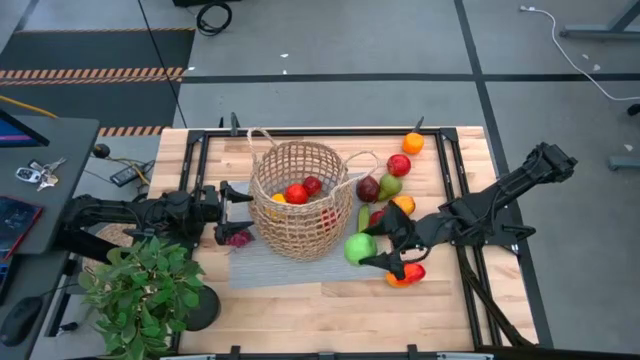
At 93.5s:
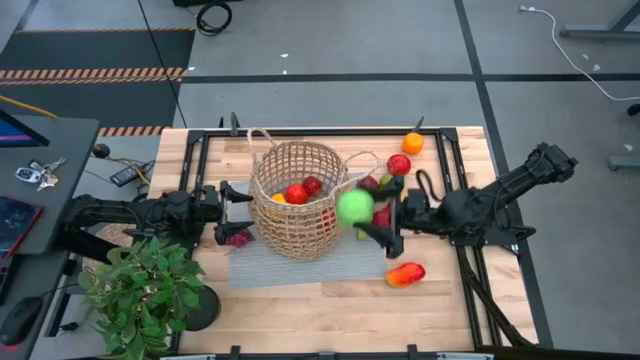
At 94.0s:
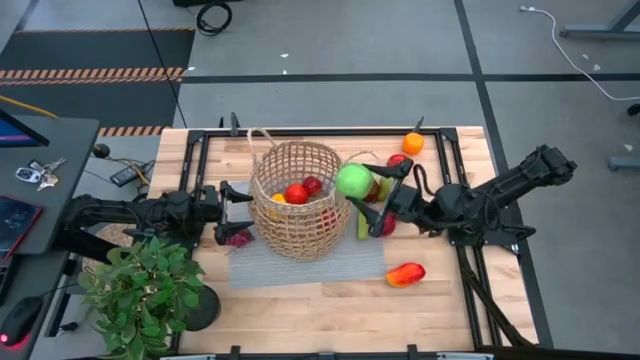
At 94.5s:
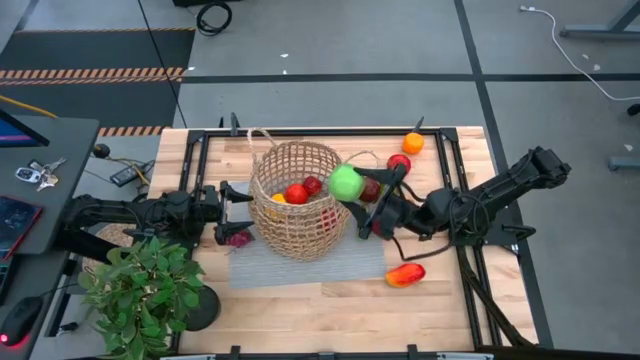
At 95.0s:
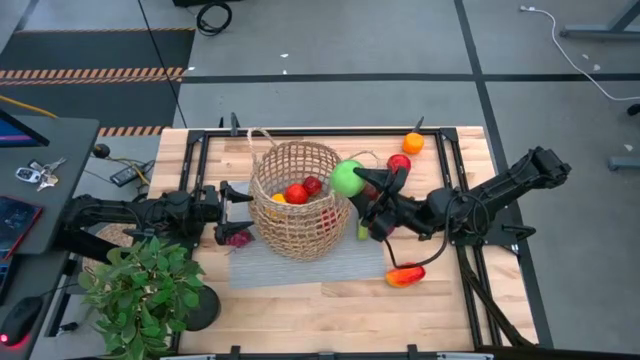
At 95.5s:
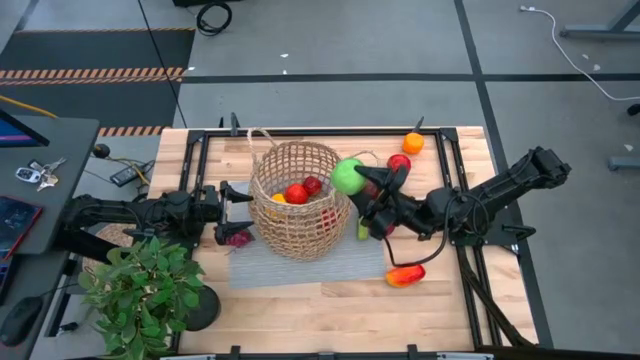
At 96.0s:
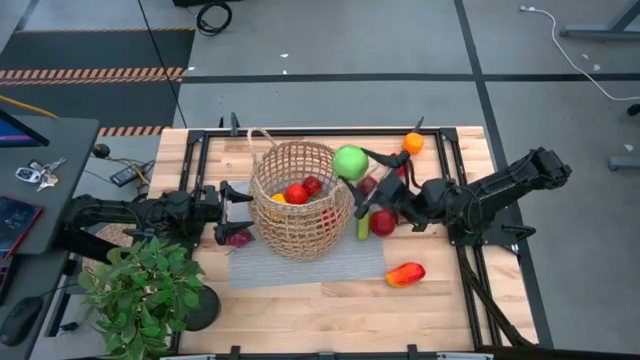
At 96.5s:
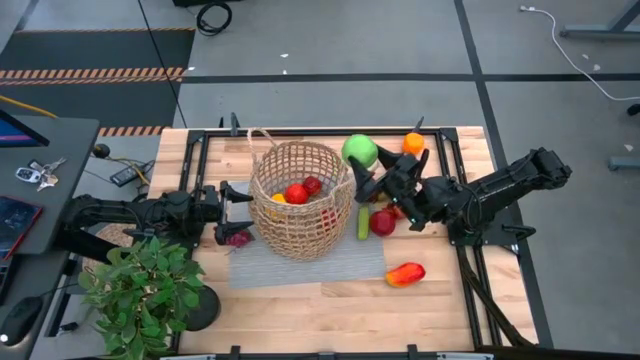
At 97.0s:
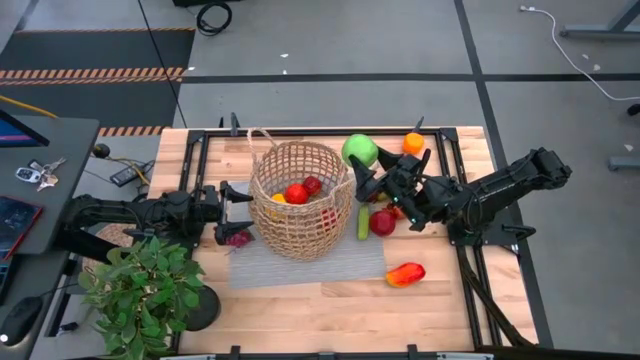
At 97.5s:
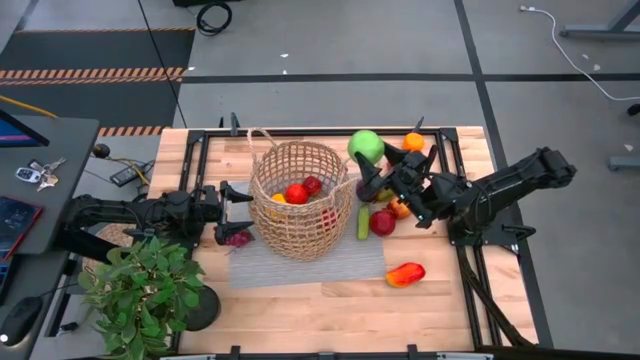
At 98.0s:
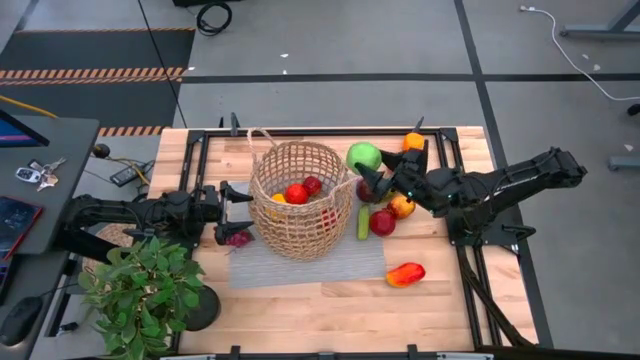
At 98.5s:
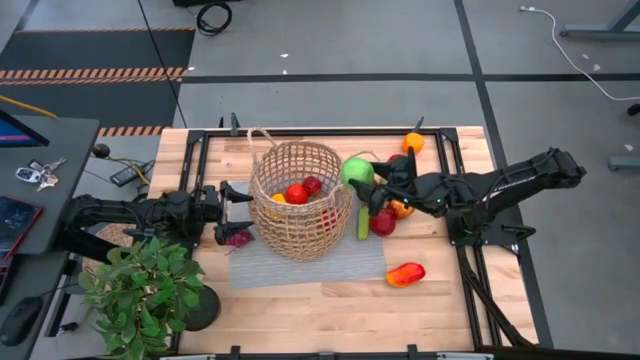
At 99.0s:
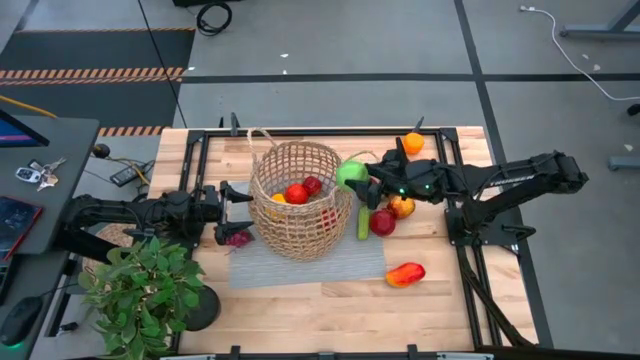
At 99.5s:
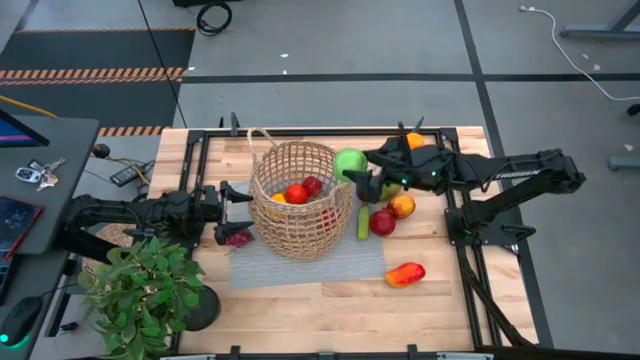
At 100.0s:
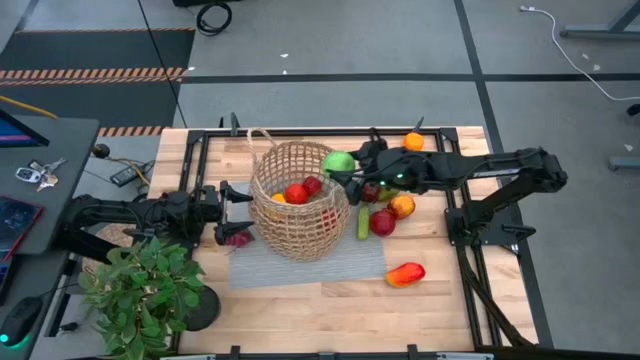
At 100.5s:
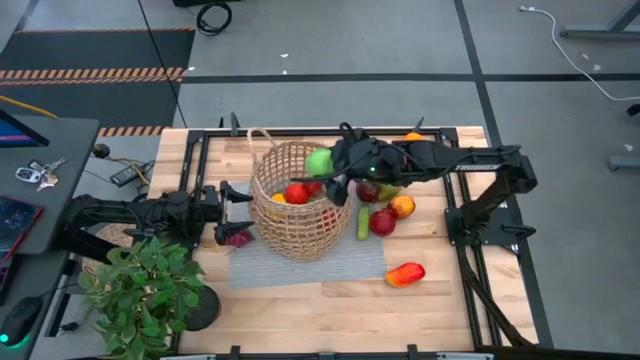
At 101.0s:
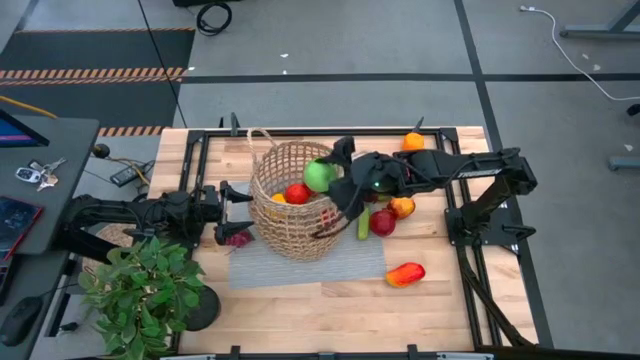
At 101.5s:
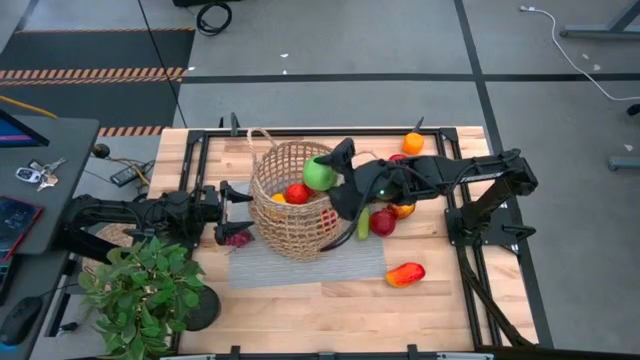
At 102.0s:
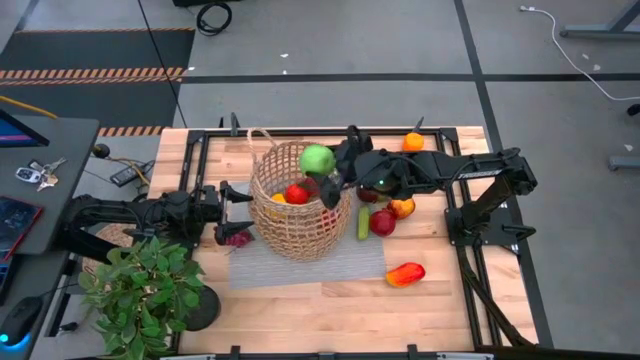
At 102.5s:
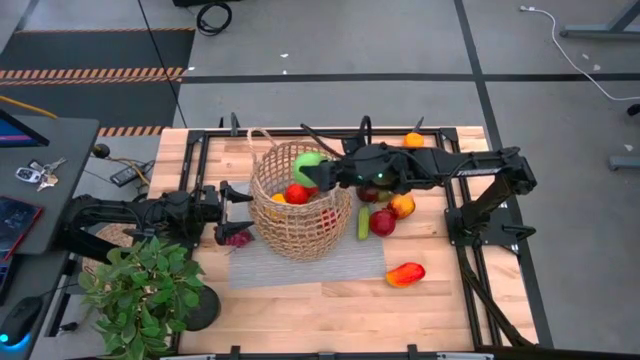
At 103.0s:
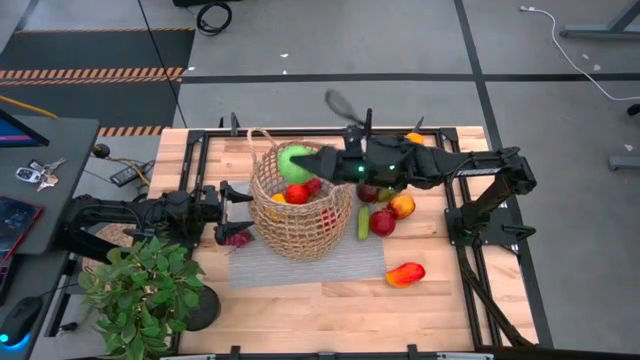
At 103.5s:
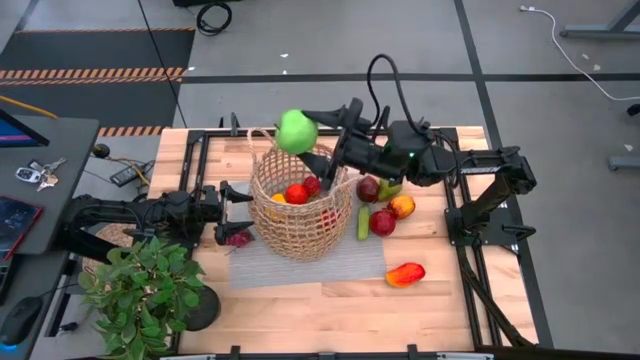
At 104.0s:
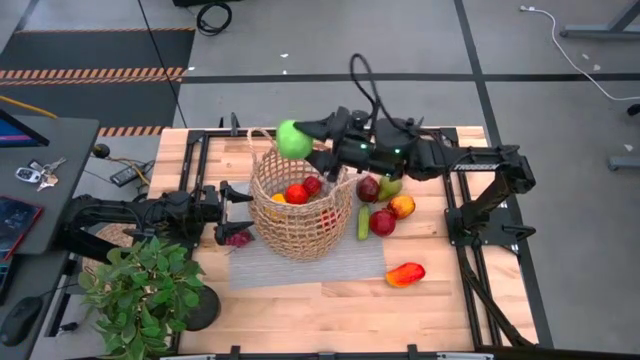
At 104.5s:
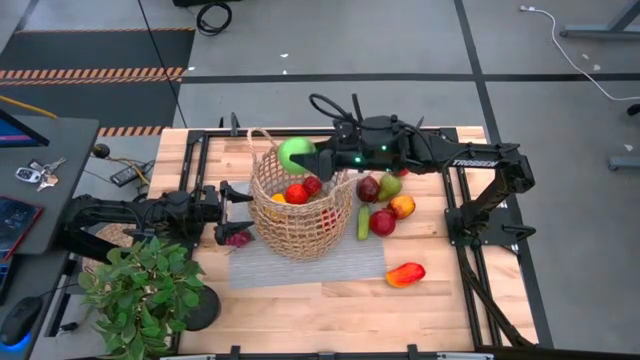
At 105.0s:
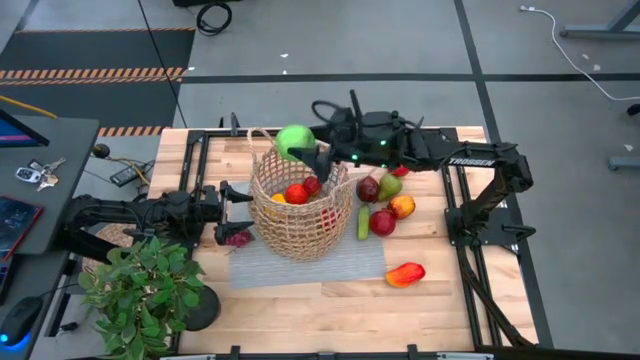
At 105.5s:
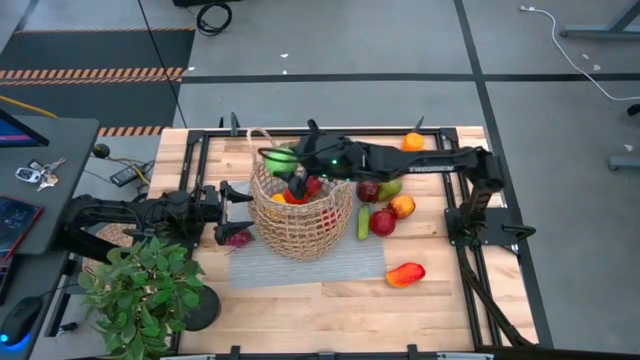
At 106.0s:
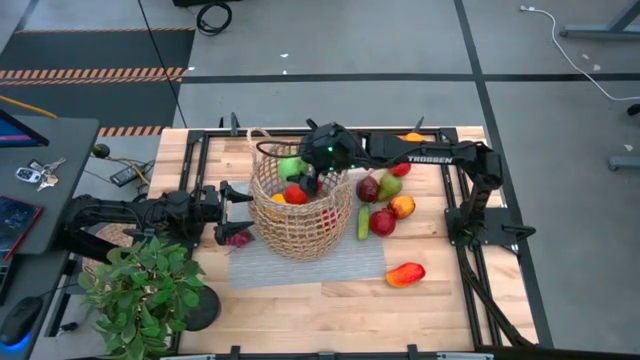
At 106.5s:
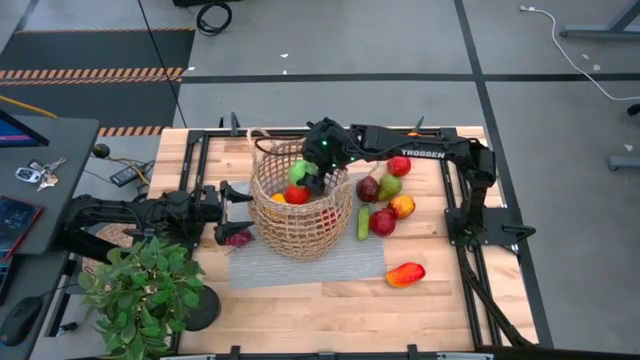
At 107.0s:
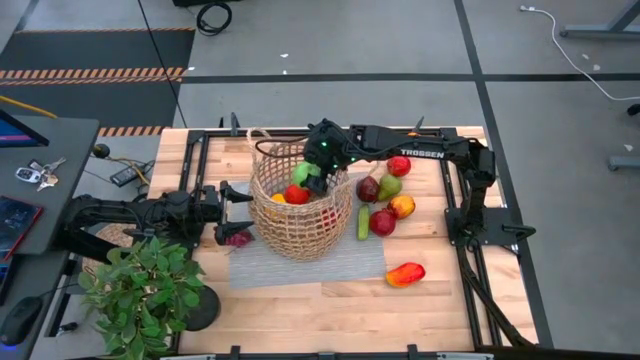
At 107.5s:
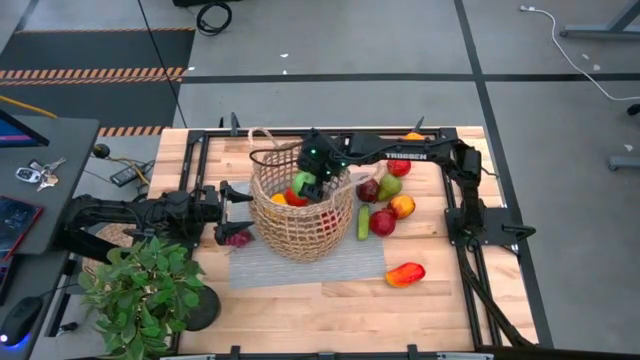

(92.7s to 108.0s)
Task: Build produce basket
Put the green apple into the brown basket

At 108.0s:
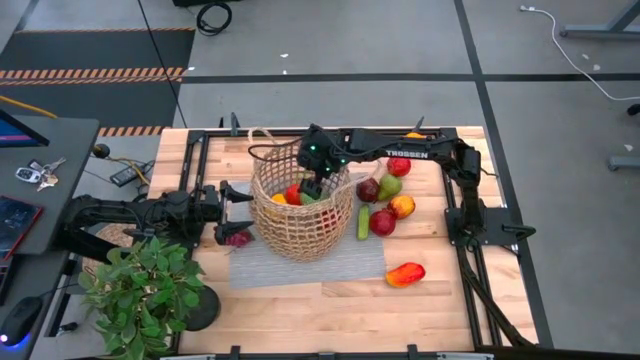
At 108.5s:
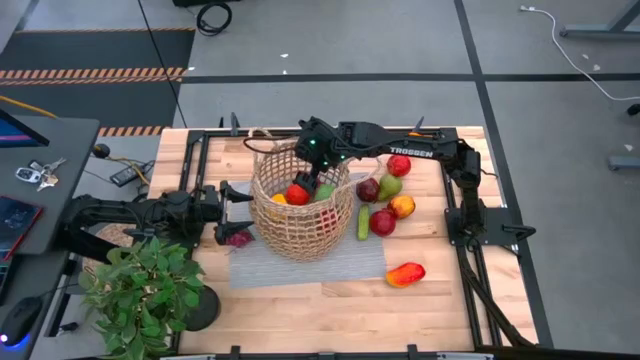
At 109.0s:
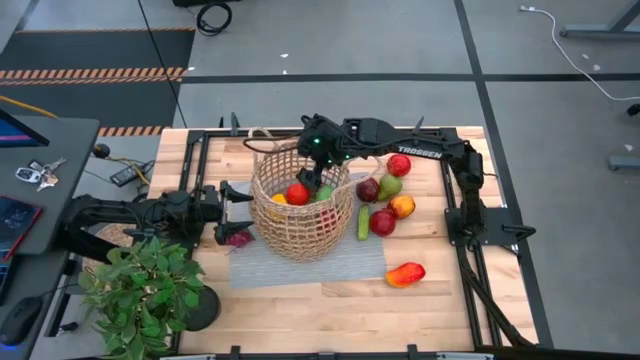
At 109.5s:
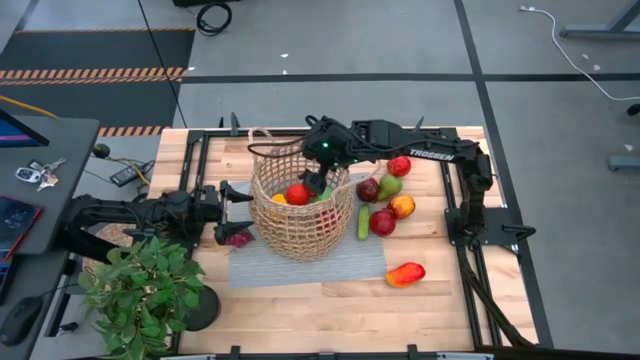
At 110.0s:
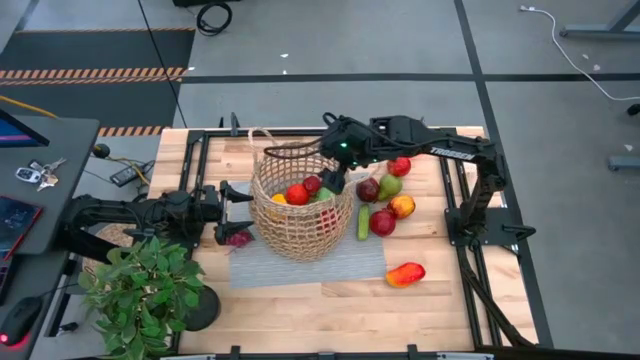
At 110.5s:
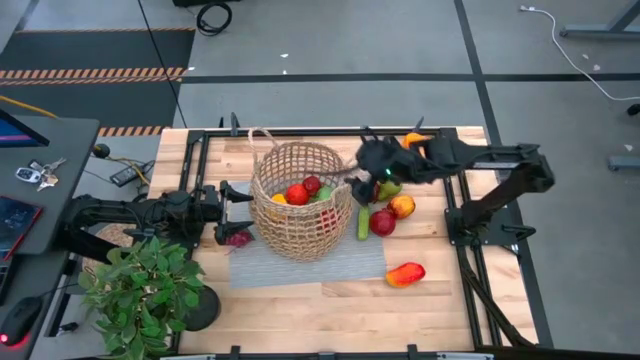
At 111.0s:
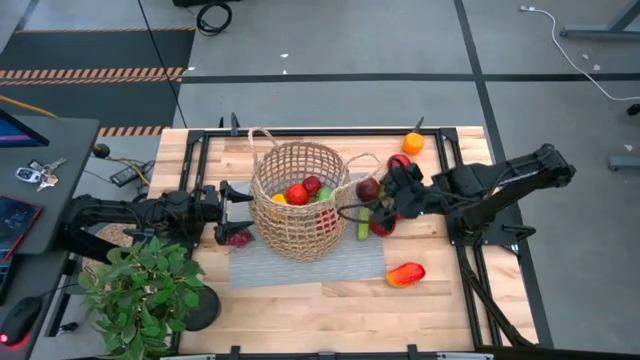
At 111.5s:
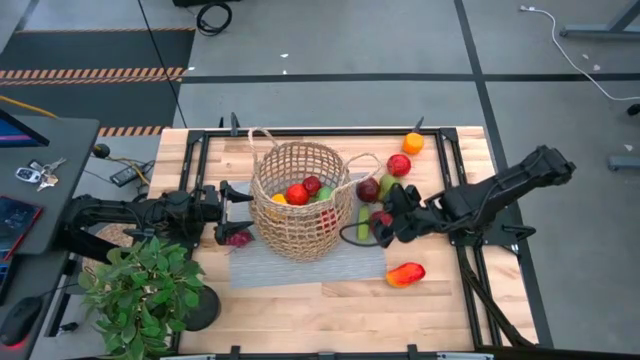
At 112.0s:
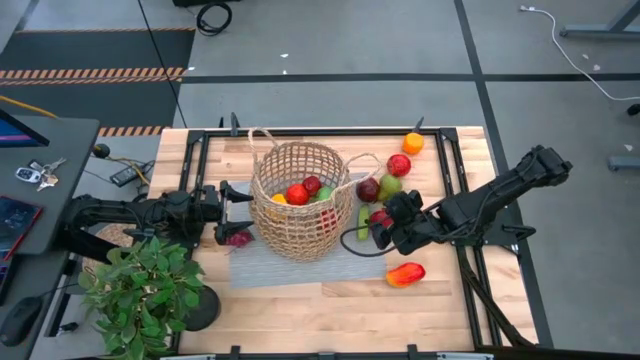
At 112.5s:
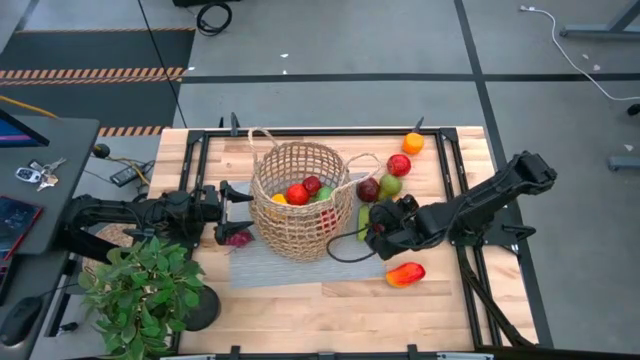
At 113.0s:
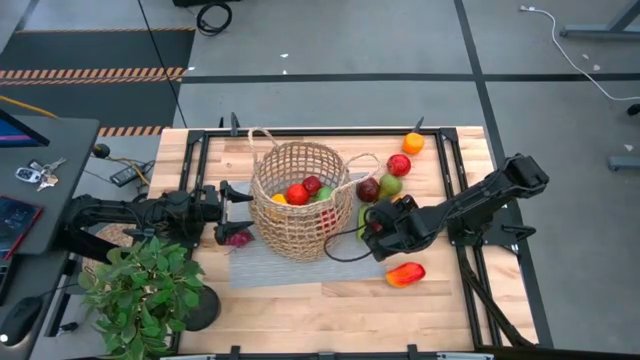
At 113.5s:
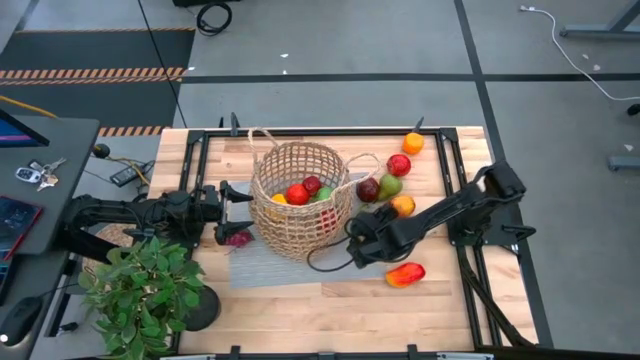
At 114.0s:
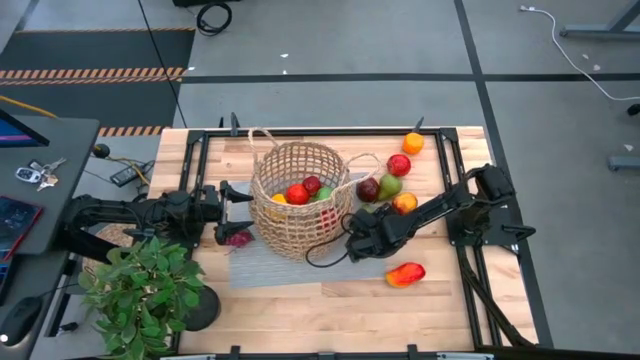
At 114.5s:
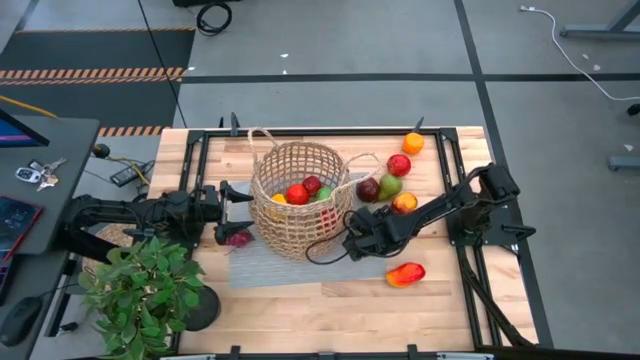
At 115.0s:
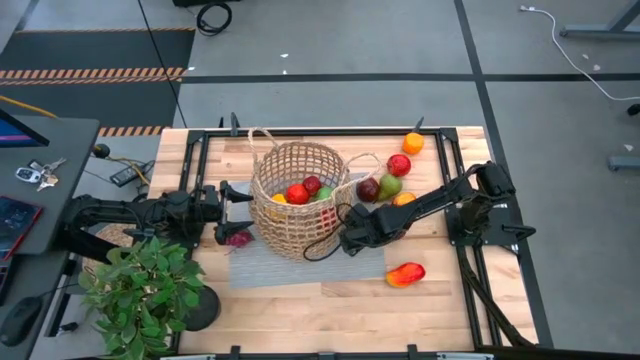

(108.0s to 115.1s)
Put the green cucumber into the brown basket
